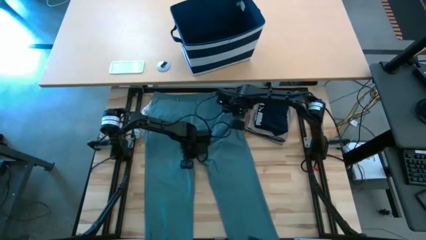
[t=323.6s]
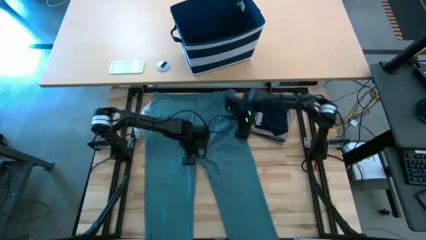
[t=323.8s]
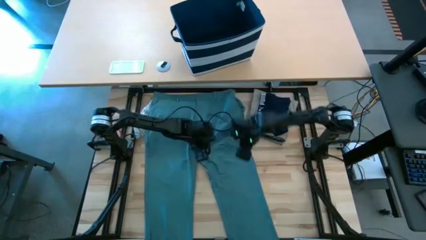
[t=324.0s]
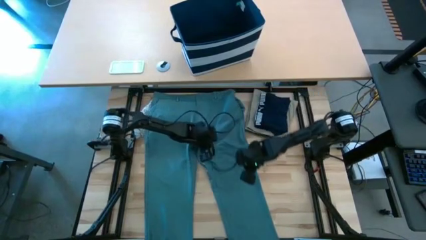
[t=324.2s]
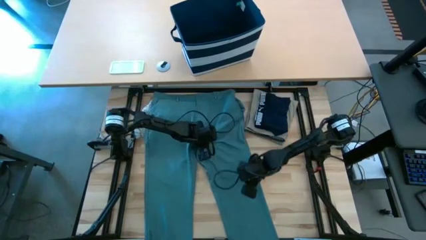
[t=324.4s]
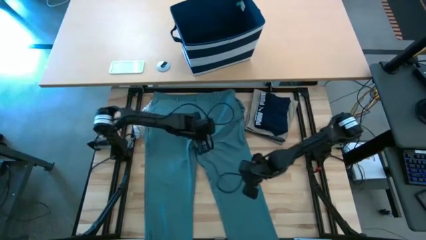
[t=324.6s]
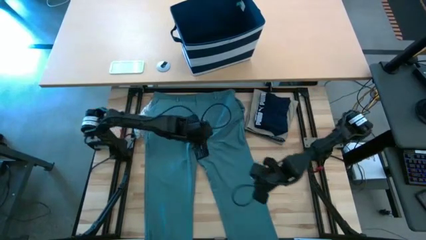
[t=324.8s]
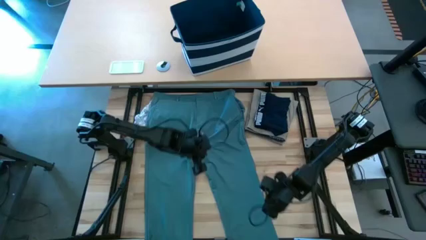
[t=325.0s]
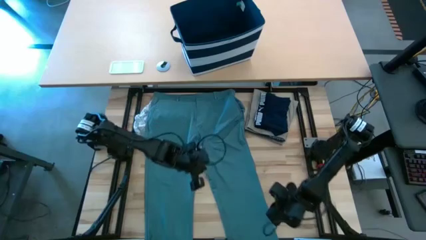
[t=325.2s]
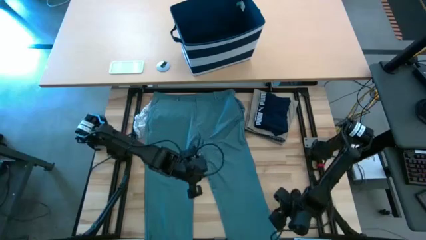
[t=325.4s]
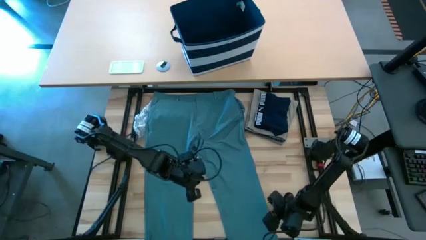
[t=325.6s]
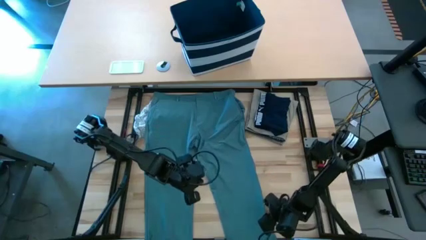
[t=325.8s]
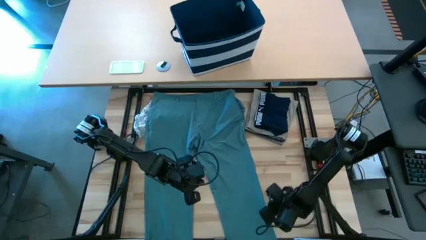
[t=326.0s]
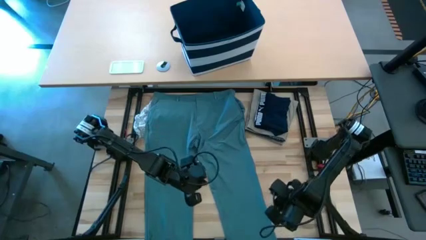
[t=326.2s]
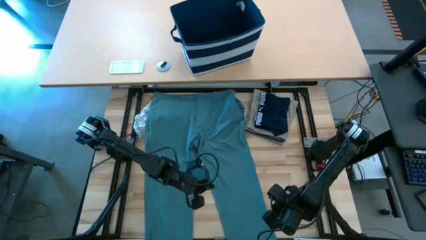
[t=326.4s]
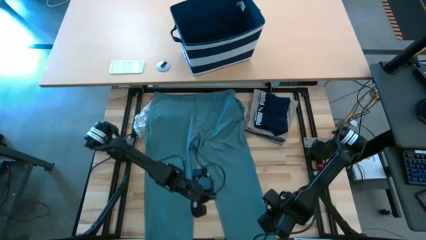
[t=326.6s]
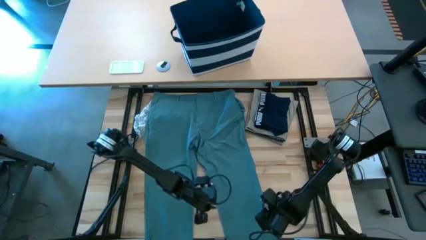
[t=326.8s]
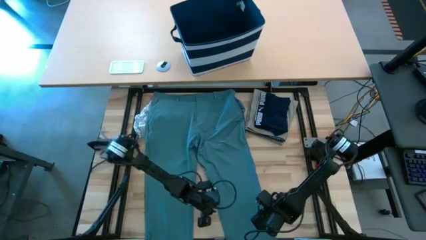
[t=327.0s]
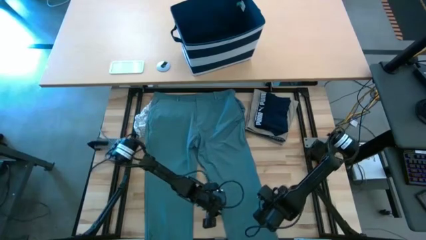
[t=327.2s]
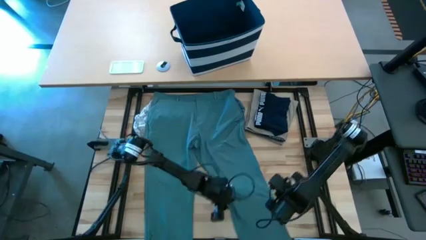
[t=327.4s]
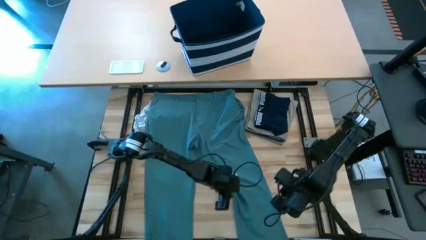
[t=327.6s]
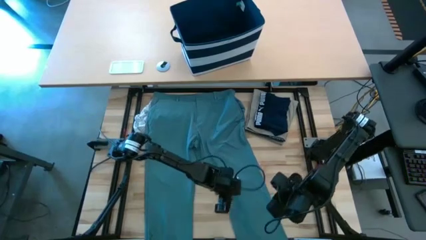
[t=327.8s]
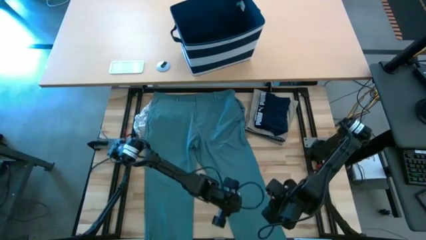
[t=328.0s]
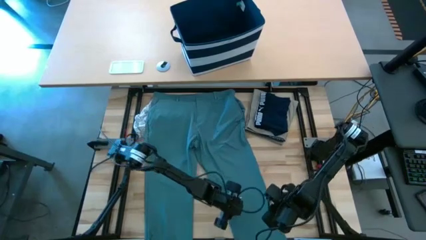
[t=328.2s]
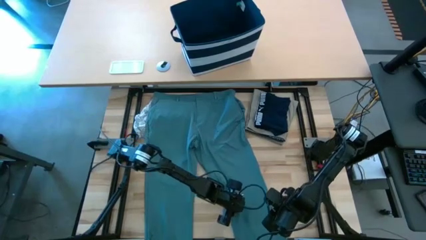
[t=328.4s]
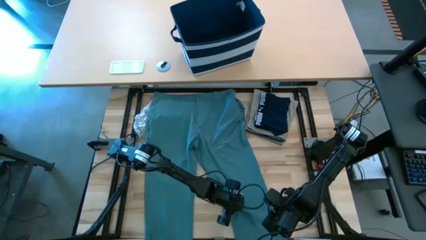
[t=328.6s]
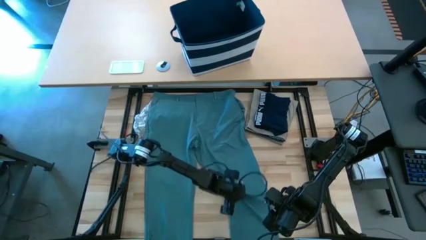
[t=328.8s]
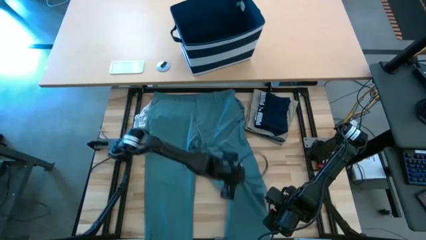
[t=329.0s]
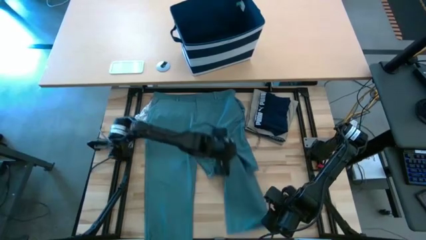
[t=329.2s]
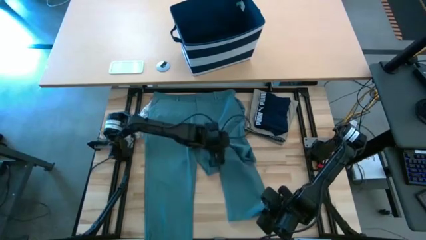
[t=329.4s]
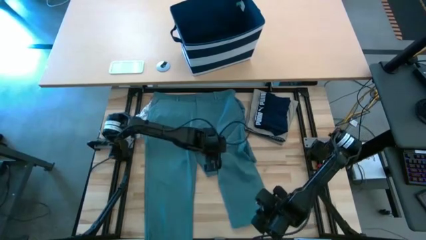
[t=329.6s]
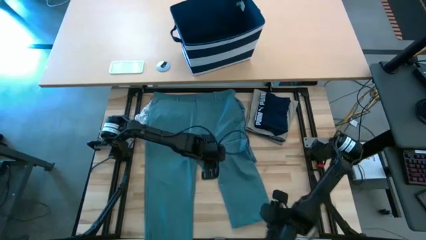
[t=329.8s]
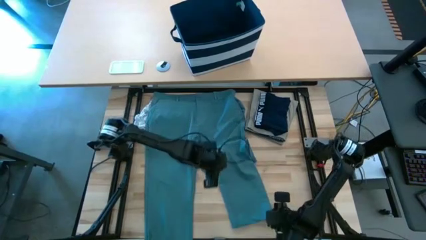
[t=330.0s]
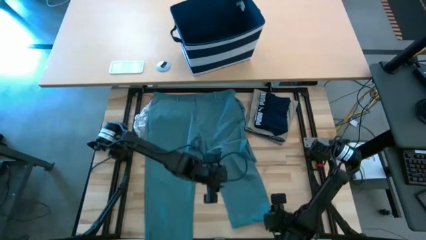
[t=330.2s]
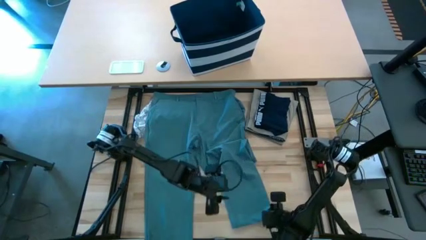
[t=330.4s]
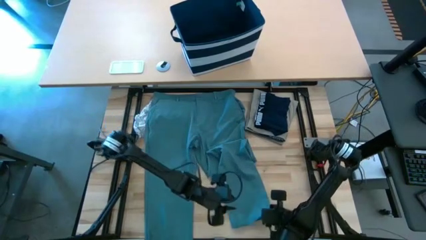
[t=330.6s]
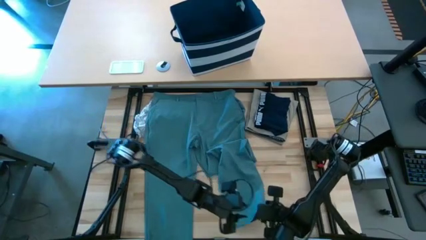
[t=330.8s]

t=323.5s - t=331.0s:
Task: Fold Laundry from Bin
Fold the blue pants

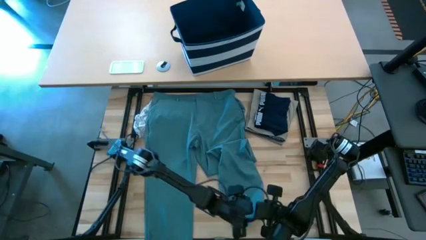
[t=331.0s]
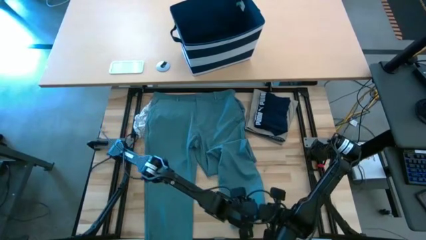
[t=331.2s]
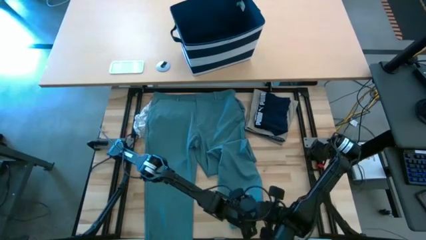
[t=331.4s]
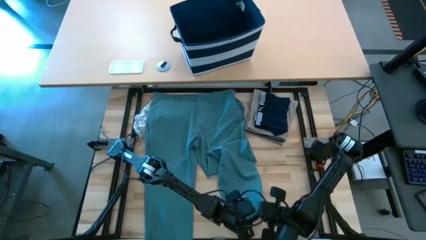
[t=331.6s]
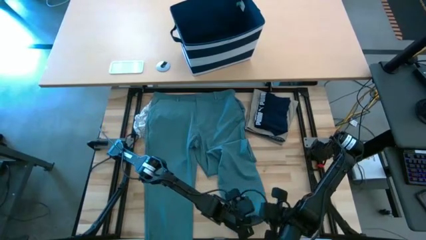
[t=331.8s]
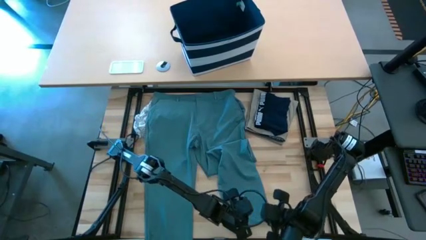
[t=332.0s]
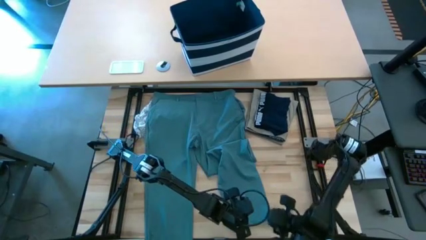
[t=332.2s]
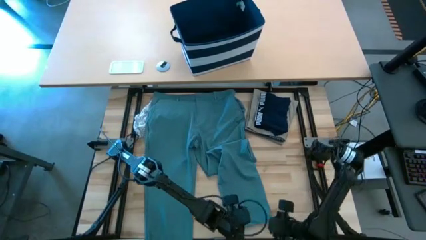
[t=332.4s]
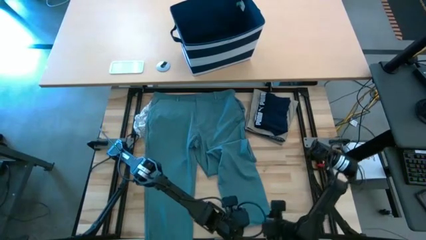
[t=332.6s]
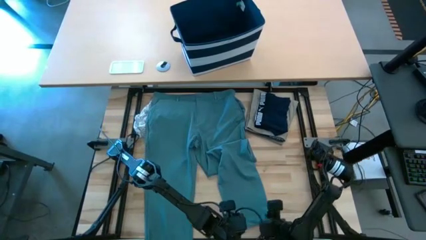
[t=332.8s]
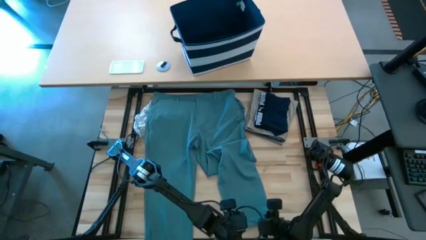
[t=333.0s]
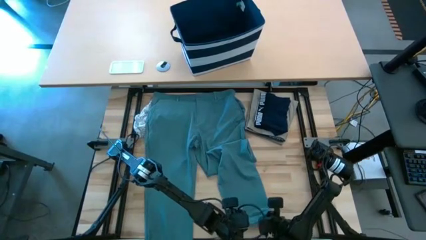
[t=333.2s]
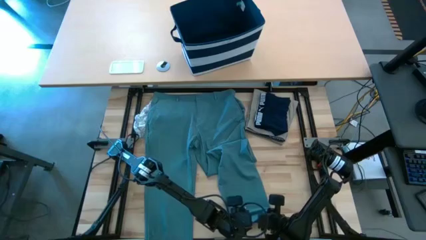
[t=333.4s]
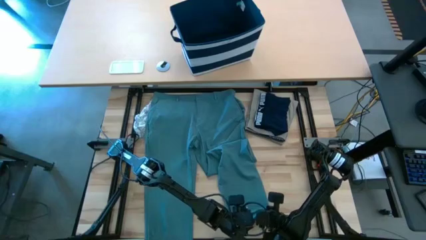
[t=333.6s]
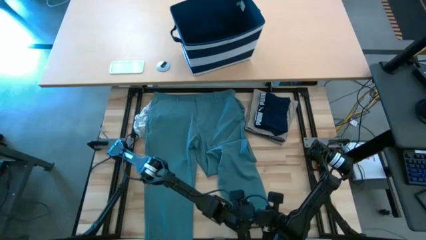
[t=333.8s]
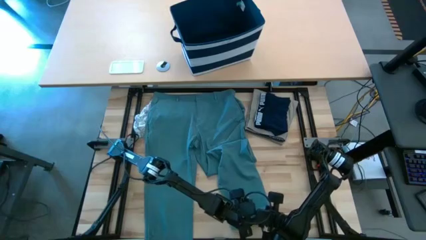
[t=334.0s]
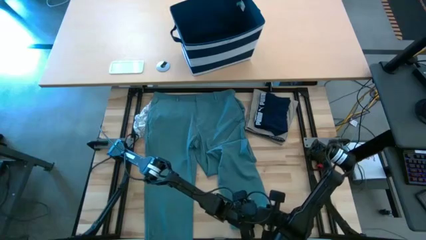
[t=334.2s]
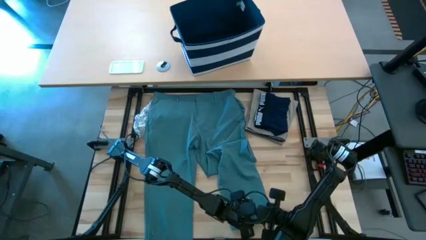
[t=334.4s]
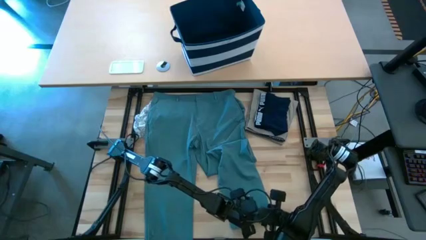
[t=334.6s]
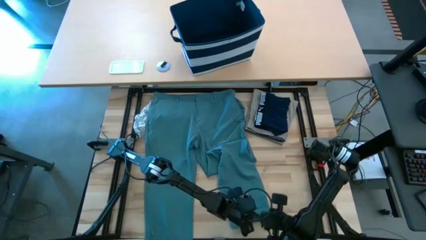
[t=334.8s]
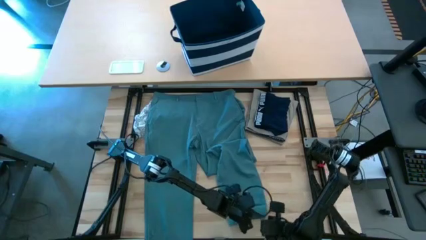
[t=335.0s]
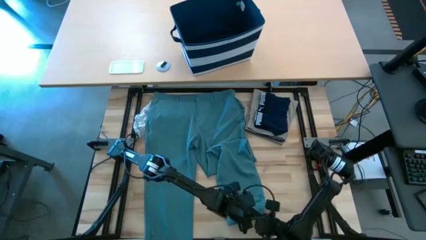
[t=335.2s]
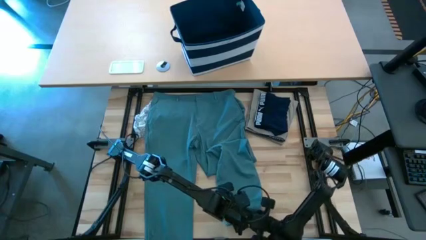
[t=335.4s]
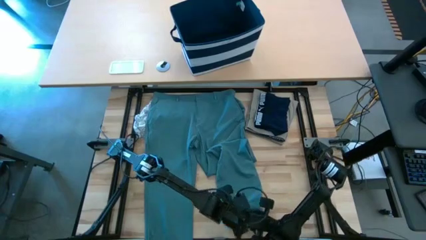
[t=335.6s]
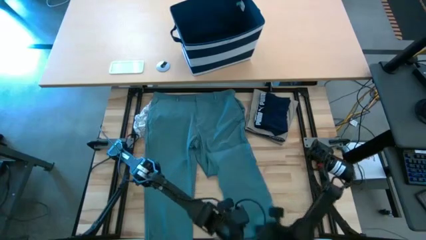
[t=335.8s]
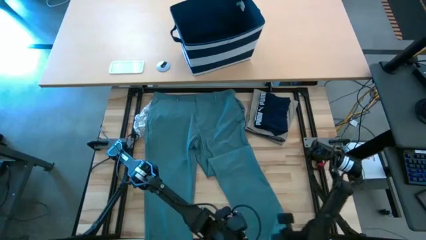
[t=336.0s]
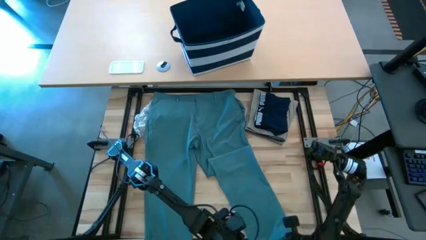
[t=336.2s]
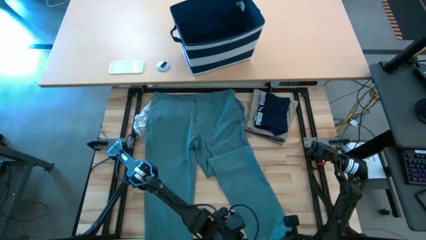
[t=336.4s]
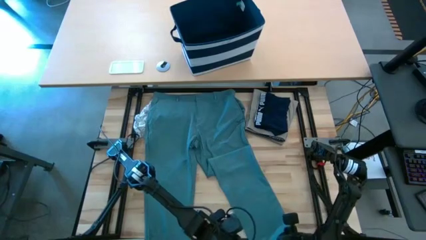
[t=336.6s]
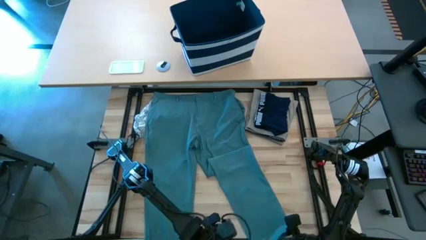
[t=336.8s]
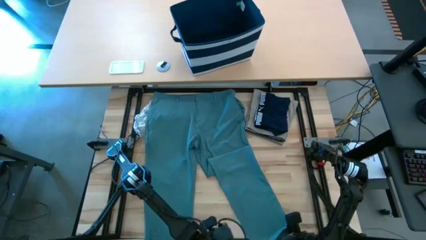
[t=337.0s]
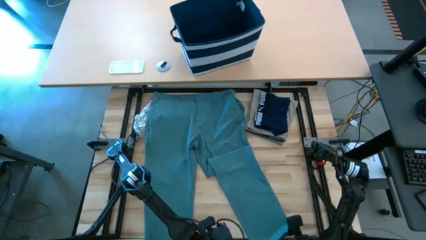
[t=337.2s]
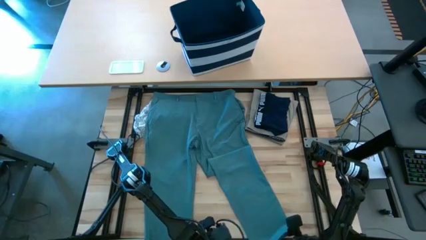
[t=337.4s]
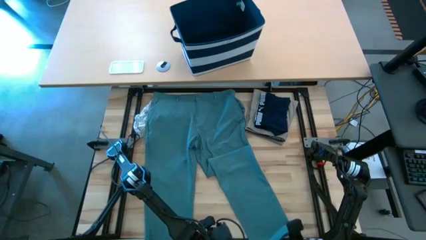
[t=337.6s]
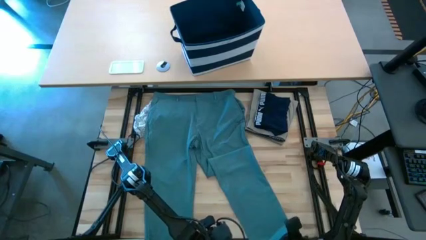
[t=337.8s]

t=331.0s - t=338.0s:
Fold the blue pants

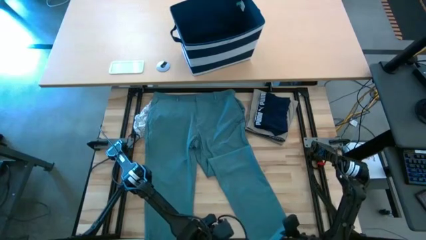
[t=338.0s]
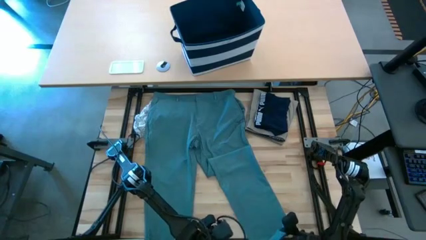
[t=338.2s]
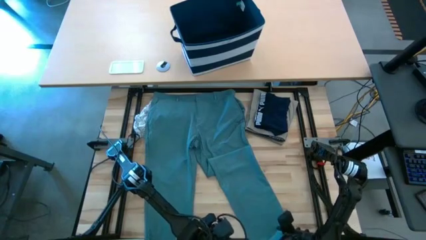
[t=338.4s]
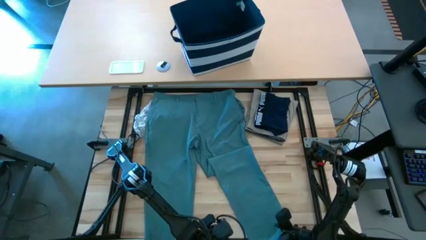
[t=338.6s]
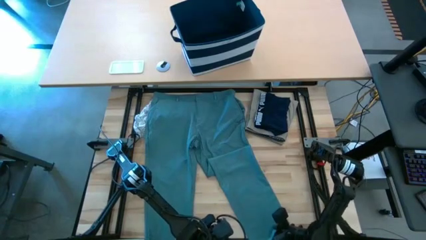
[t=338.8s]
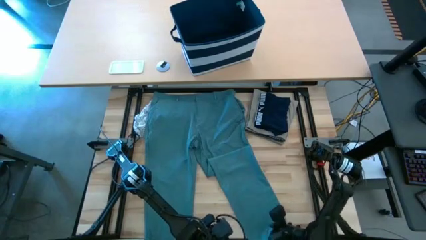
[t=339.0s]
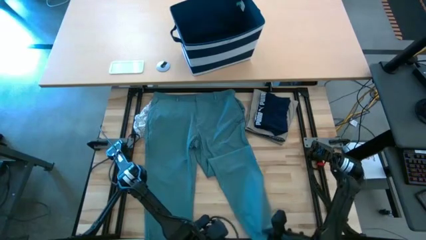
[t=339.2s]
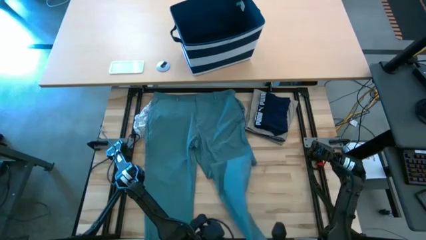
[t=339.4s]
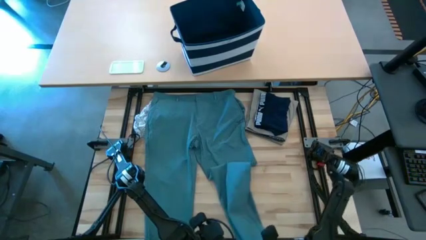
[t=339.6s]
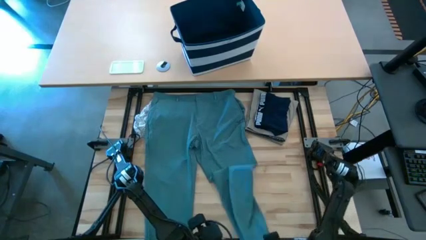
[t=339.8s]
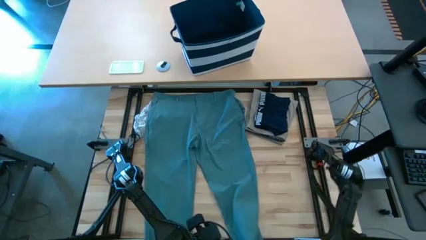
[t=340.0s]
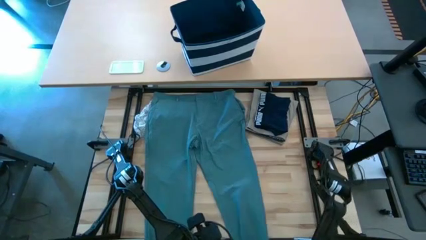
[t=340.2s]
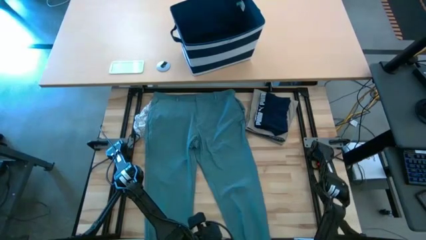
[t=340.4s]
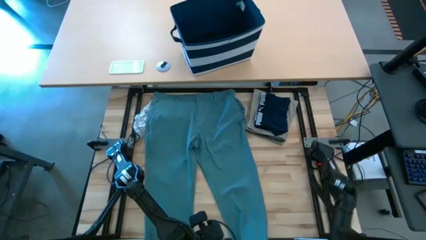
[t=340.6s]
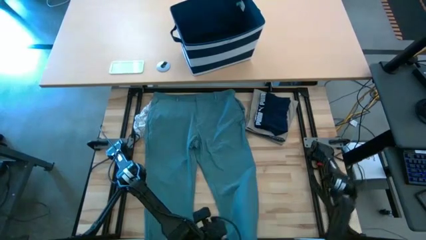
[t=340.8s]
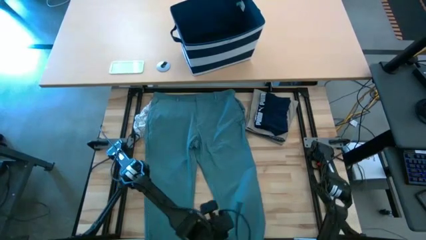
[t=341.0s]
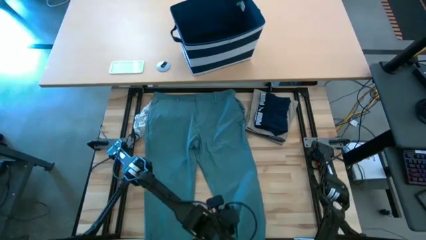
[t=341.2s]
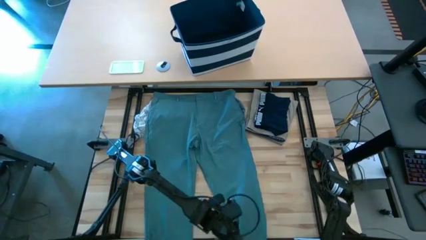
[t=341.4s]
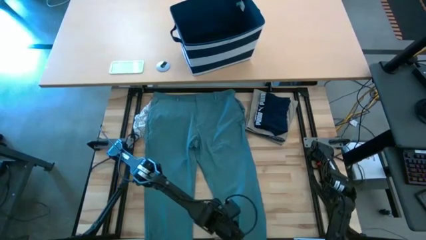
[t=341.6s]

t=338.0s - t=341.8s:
Fold the blue pants
